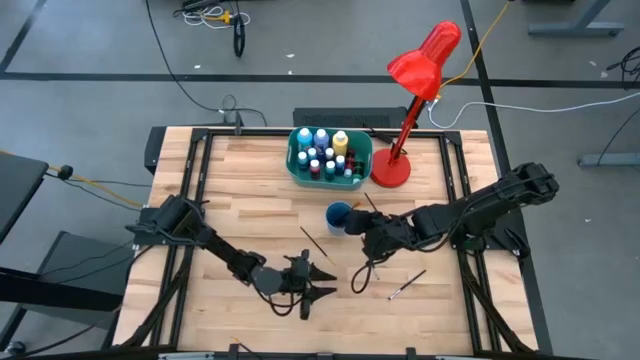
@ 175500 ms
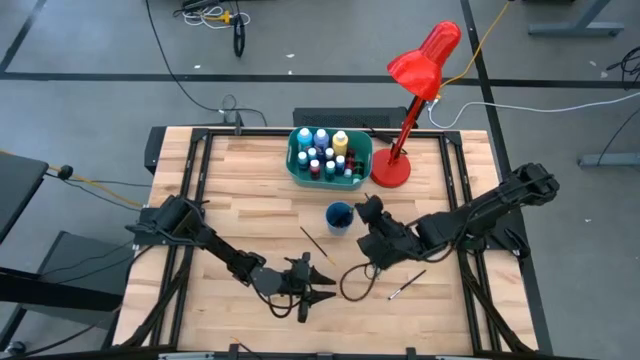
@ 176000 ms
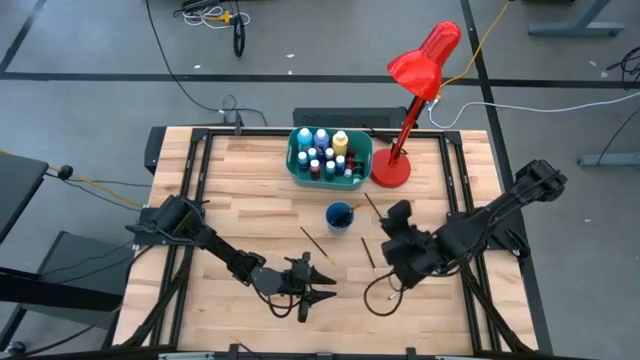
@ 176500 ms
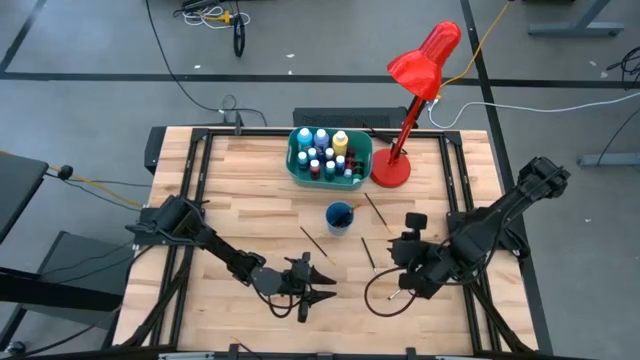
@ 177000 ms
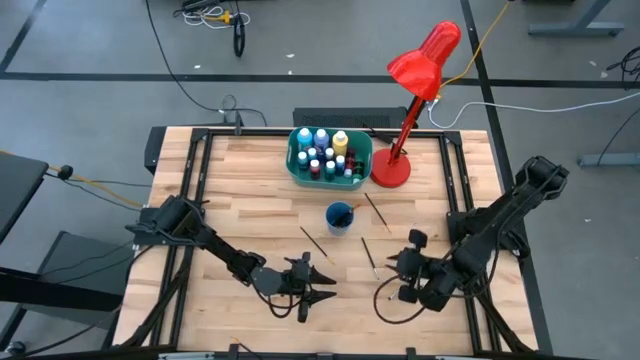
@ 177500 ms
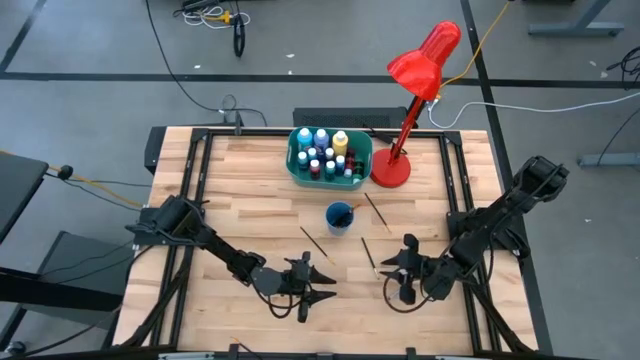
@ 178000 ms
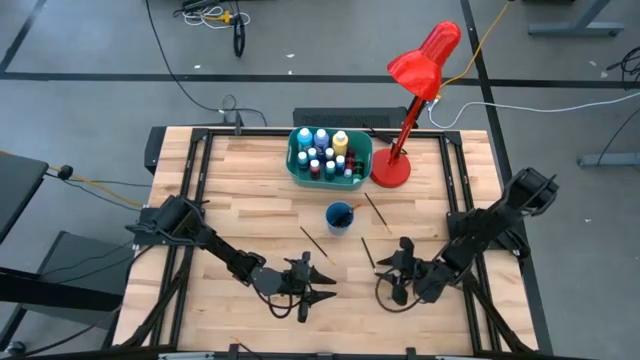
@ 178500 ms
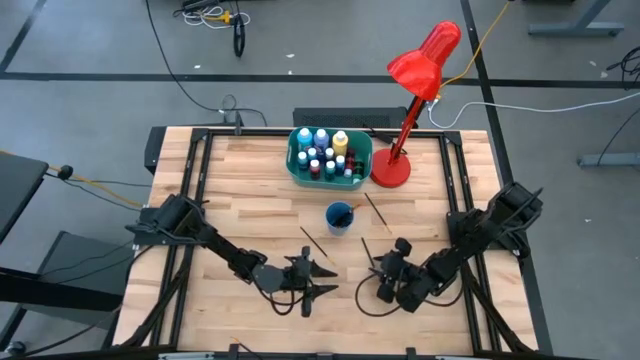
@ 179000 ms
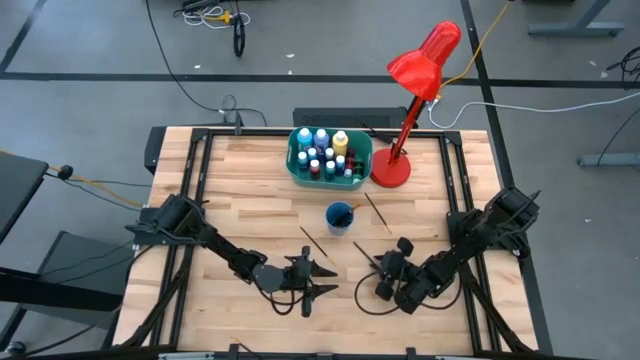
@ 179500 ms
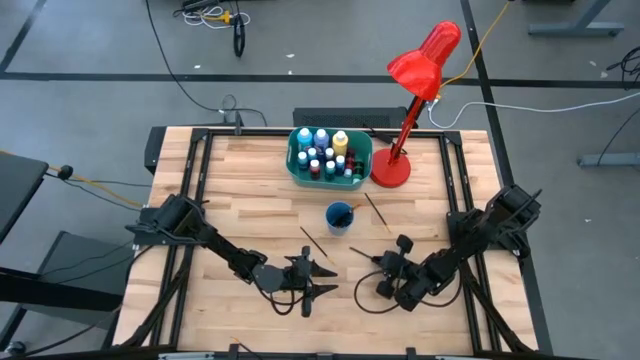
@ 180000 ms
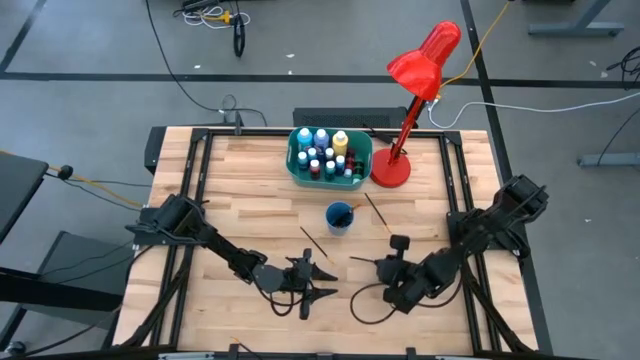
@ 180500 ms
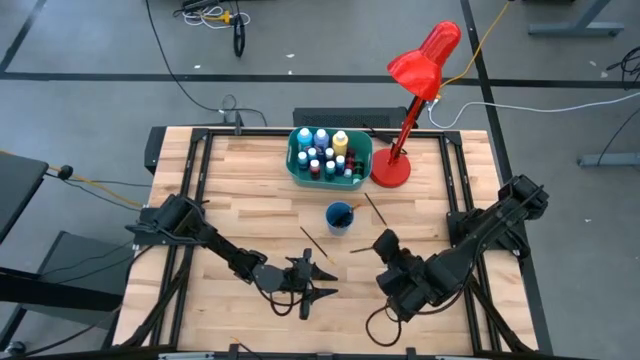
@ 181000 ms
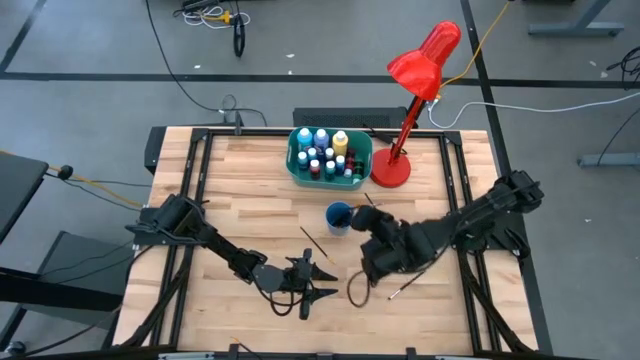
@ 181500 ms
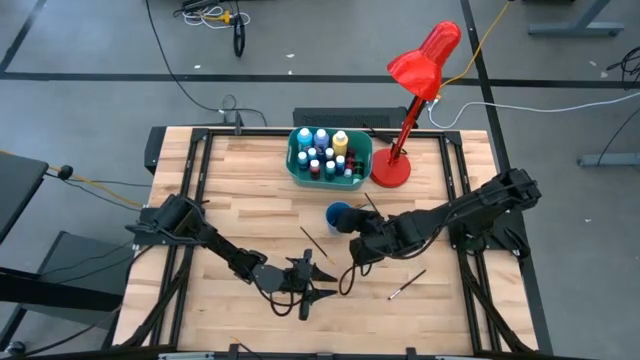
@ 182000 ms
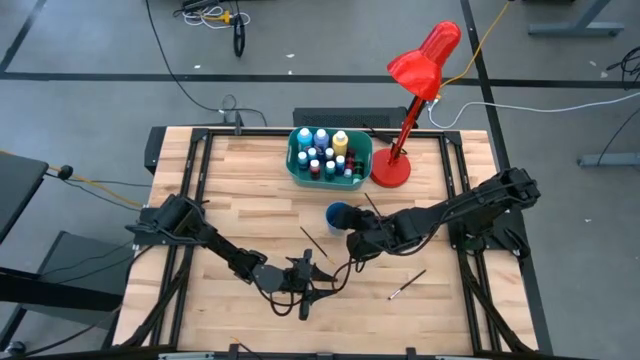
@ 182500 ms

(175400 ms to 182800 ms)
Task: Pick & Place Paint Supplies
Put the silver paint brush into the blue cup

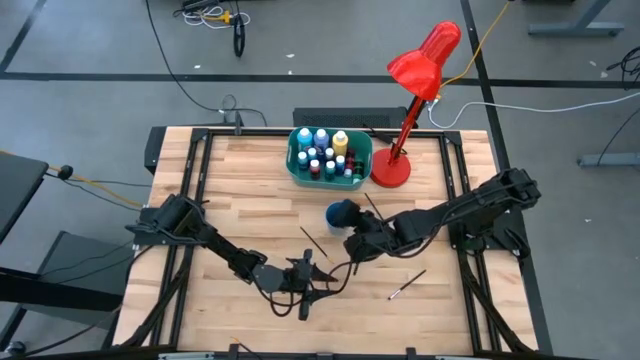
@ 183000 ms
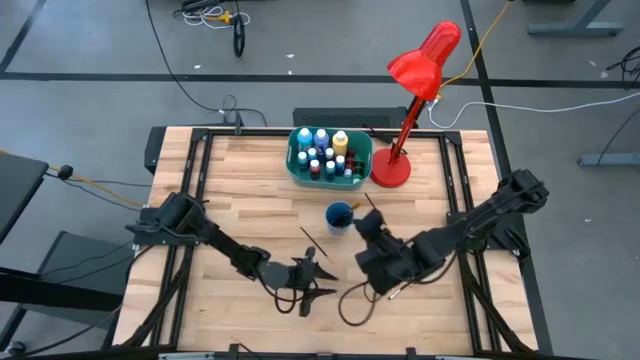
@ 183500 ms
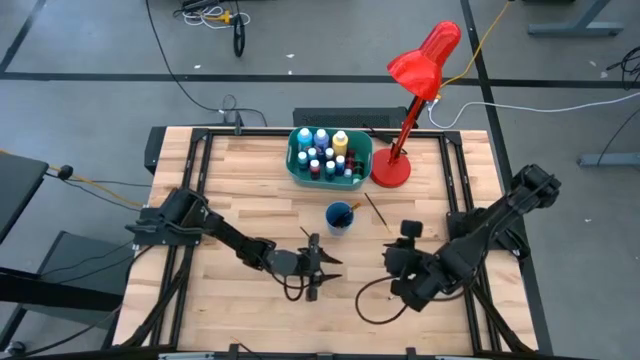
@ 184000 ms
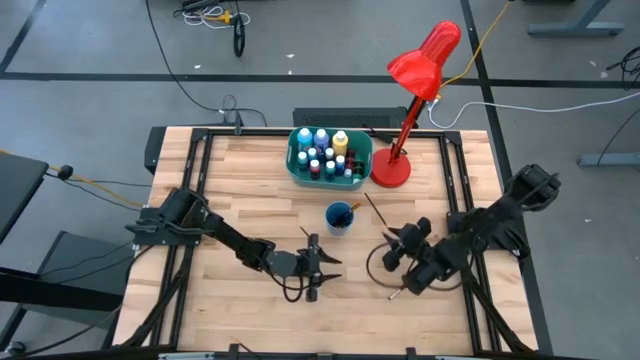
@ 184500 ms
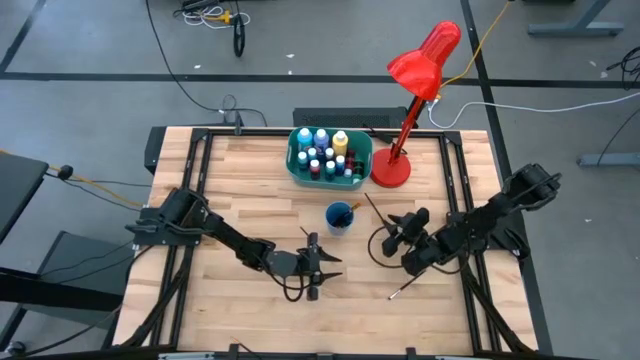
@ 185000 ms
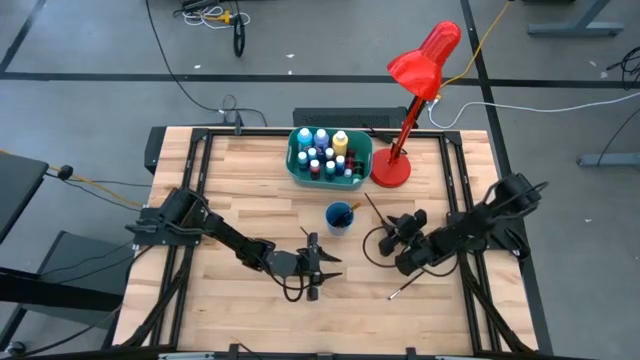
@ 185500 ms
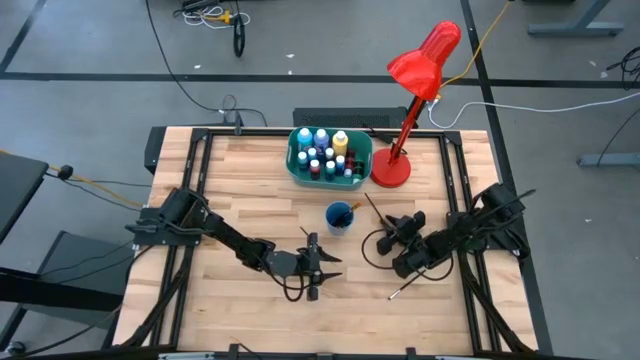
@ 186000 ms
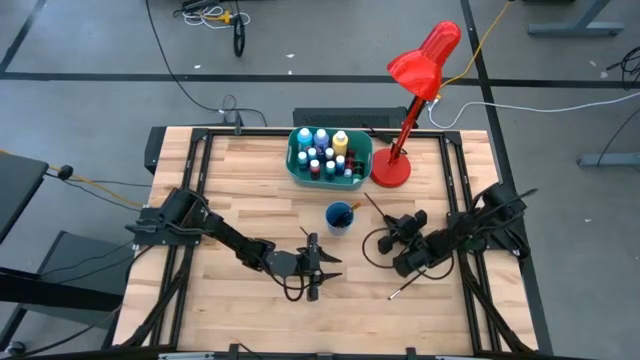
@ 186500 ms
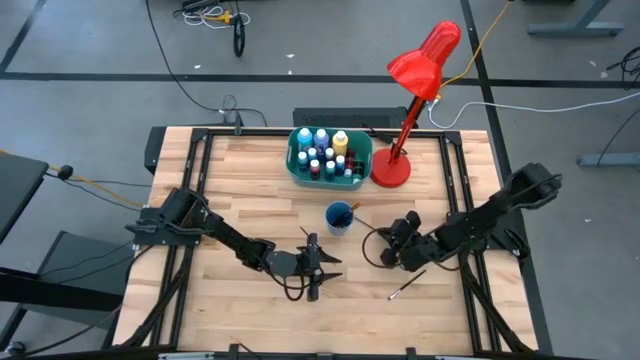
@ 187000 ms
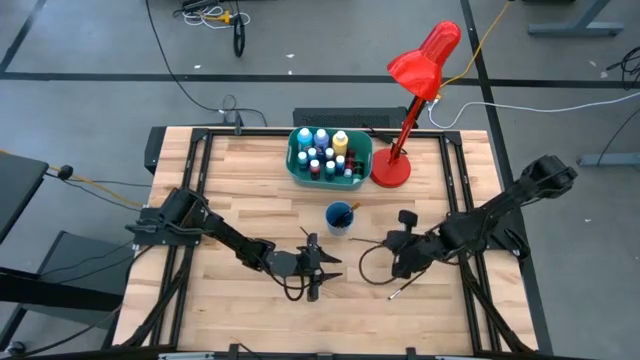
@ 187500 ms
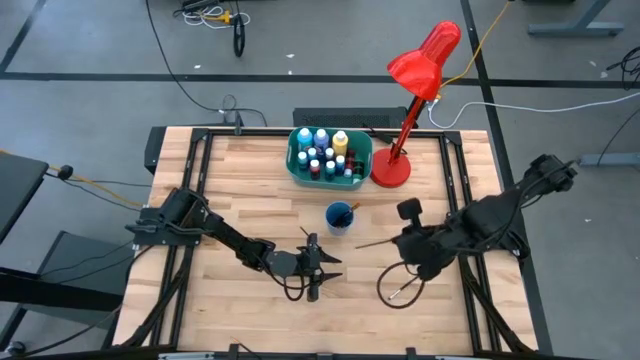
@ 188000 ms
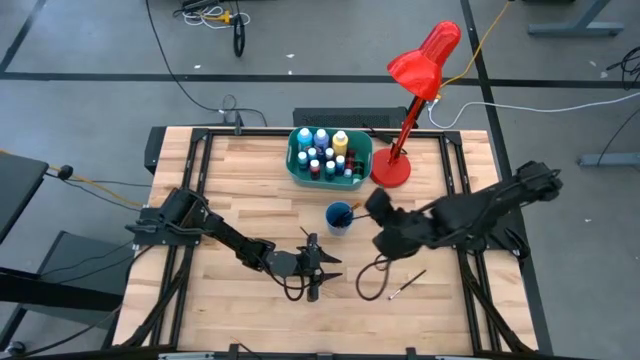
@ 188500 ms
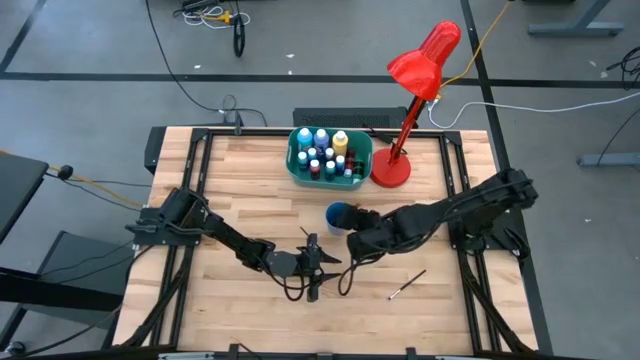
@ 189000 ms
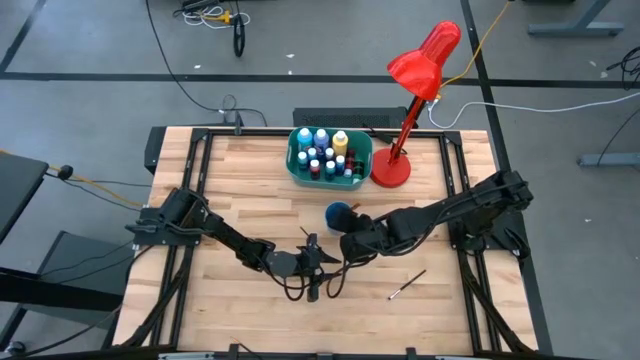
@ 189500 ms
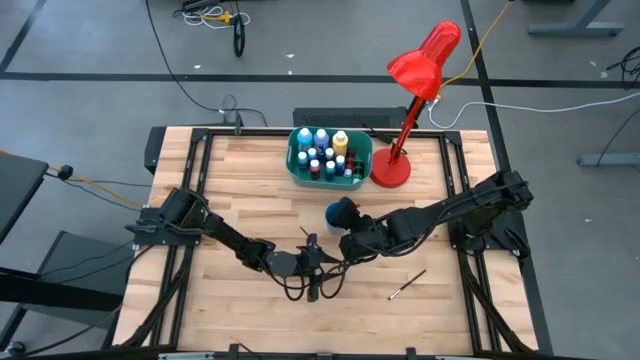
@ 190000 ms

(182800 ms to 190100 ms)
Put the gold paint brush into the blue cup

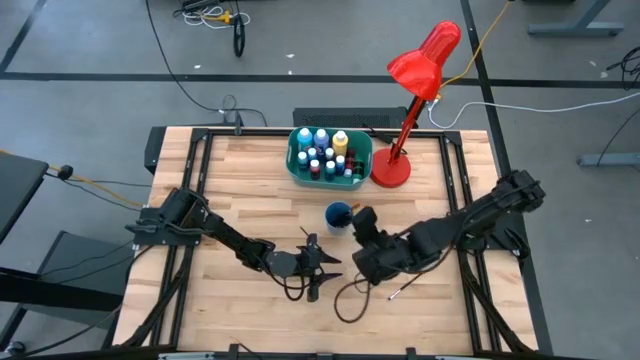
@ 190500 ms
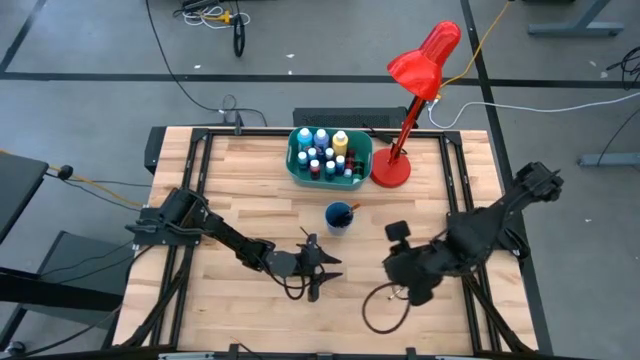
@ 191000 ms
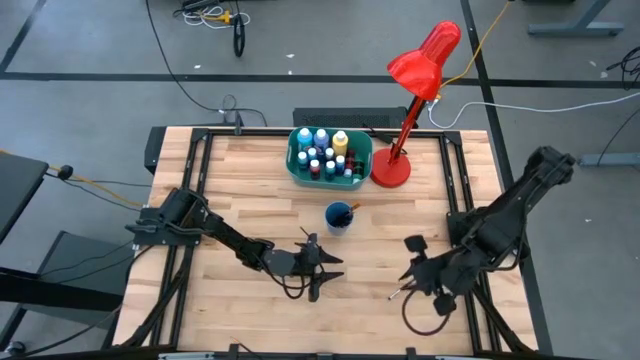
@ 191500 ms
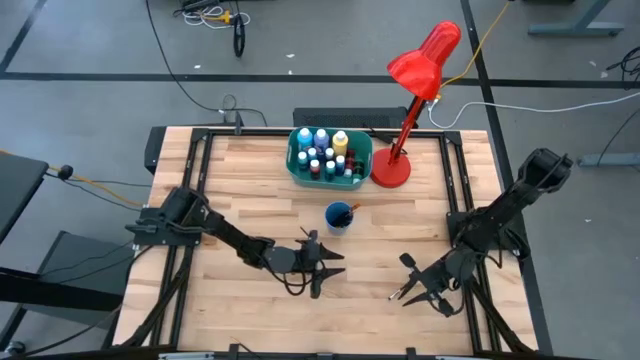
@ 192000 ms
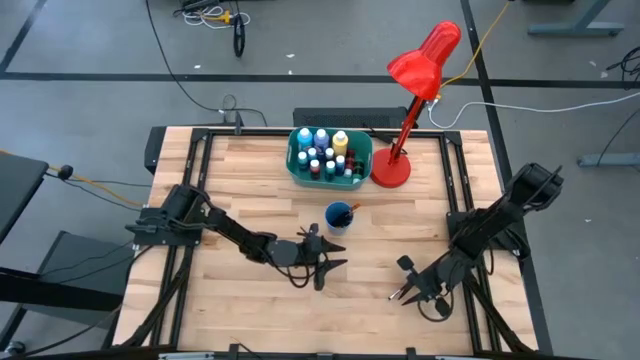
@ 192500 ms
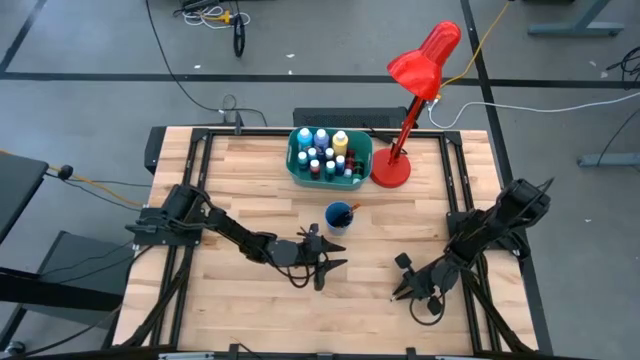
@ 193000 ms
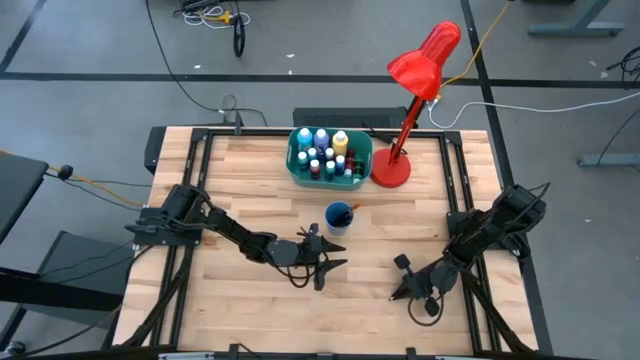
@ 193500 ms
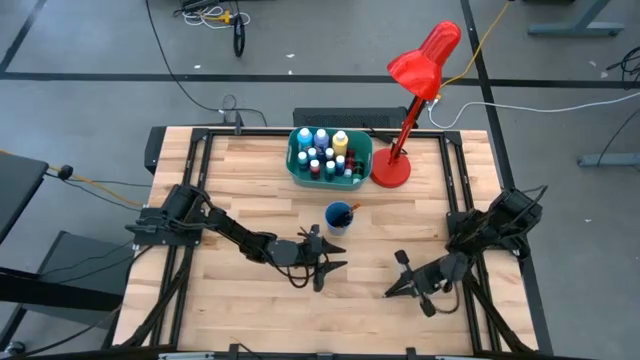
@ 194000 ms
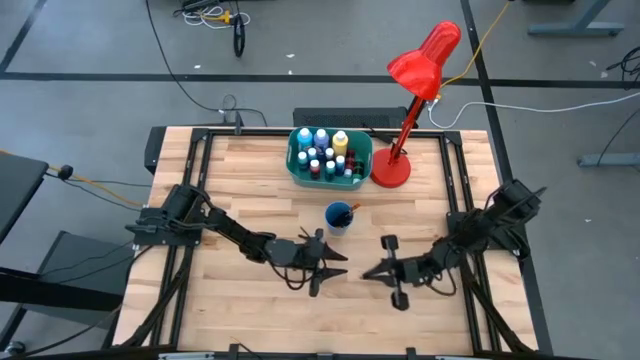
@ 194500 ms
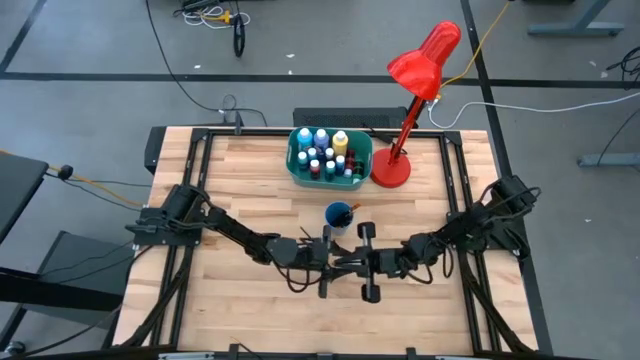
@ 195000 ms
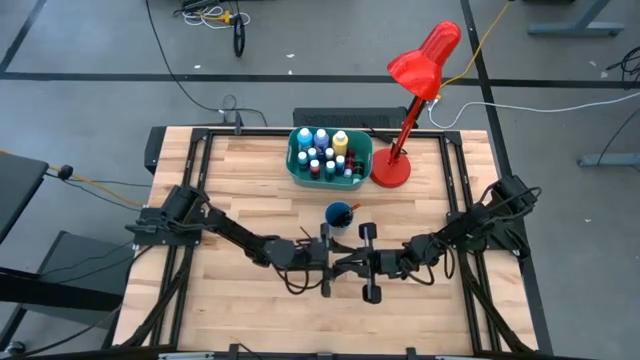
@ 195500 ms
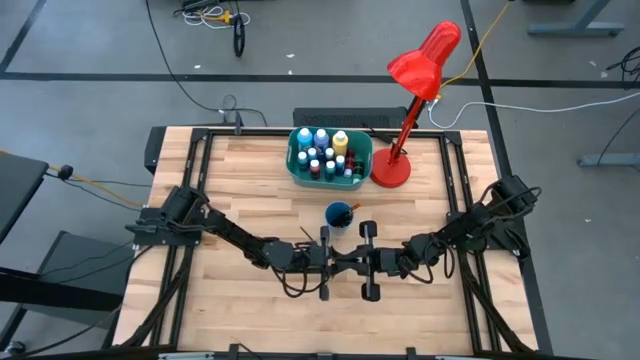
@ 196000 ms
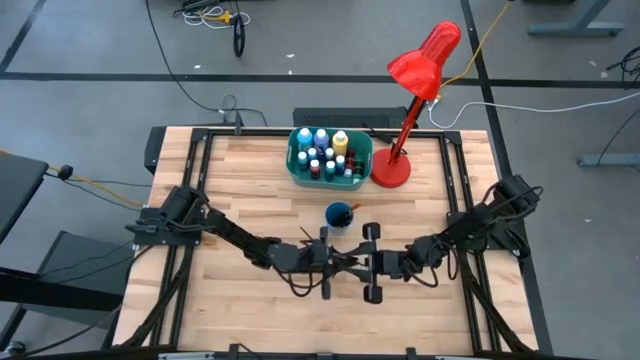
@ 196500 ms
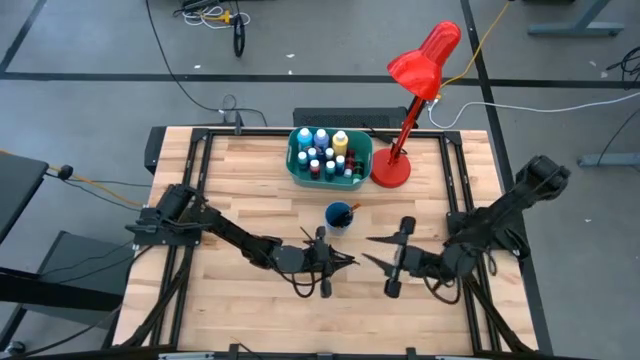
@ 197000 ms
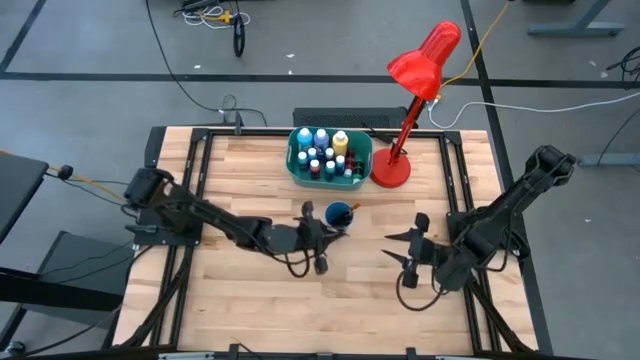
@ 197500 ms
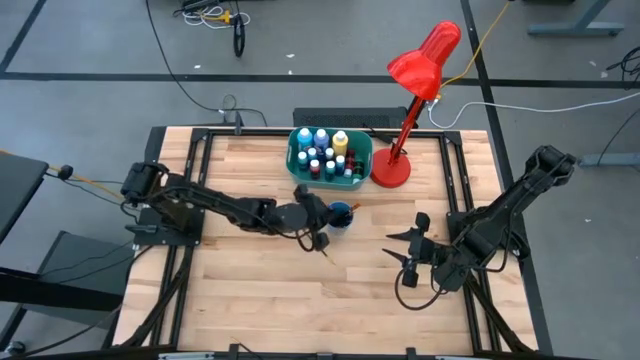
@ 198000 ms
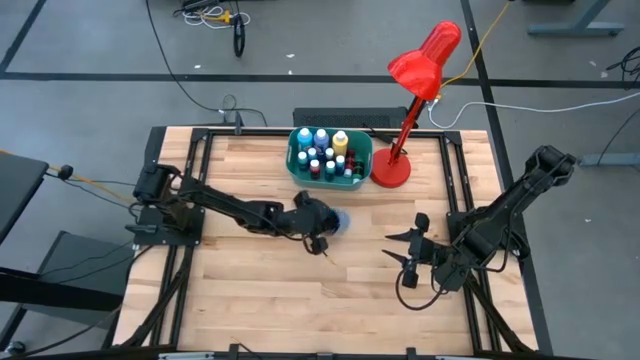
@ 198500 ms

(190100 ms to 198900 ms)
Put the silver paint brush into the blue cup
